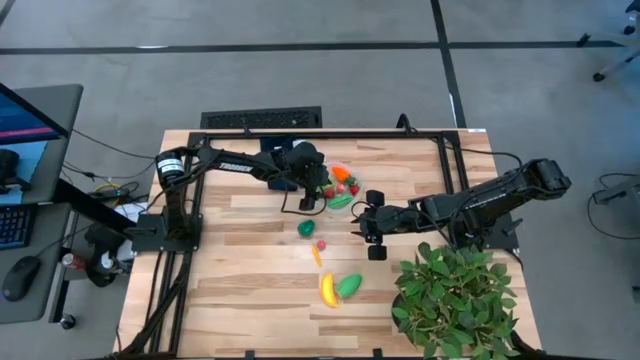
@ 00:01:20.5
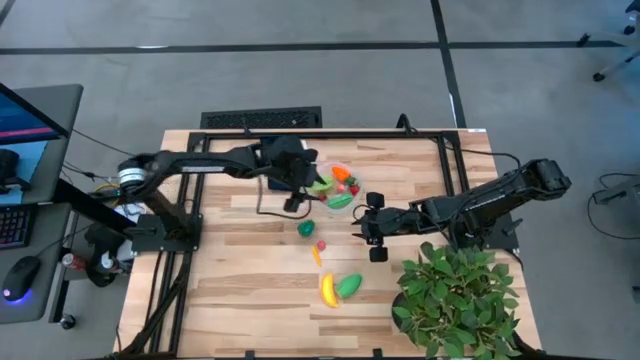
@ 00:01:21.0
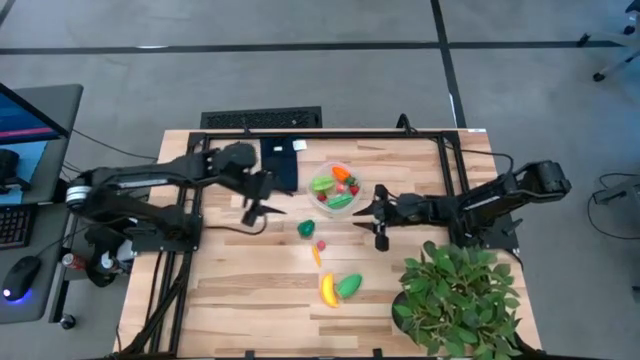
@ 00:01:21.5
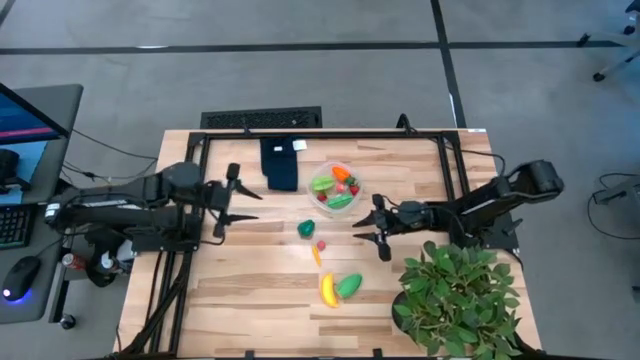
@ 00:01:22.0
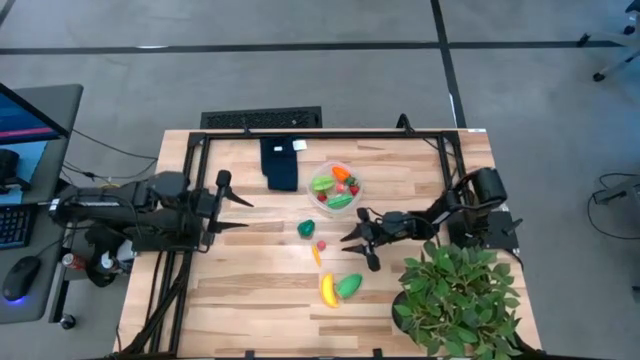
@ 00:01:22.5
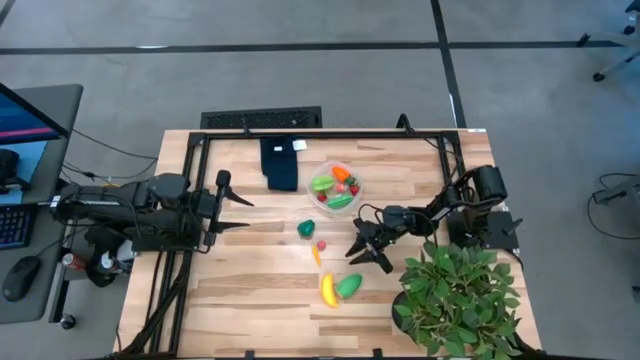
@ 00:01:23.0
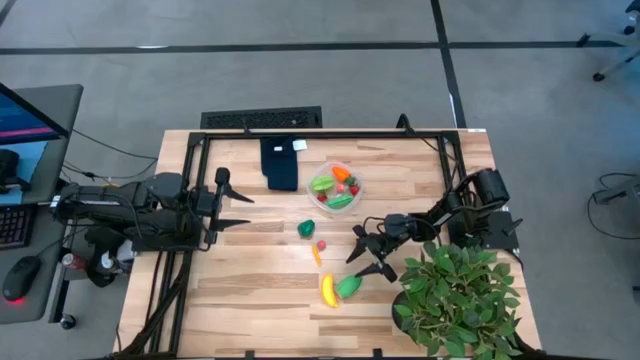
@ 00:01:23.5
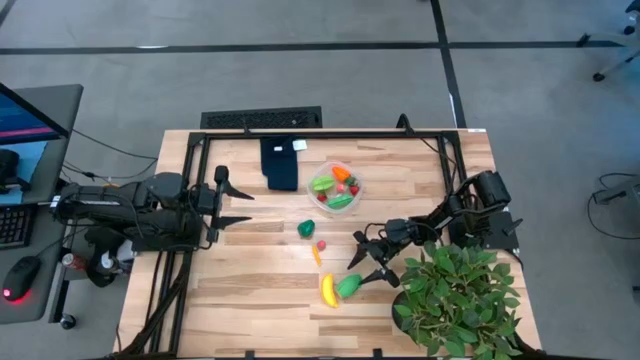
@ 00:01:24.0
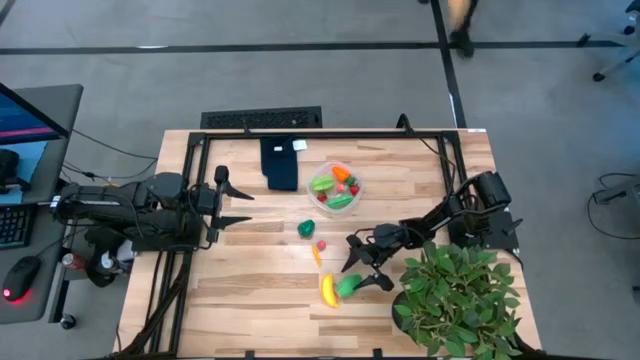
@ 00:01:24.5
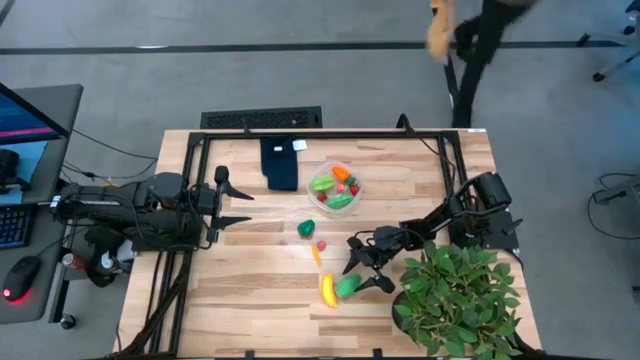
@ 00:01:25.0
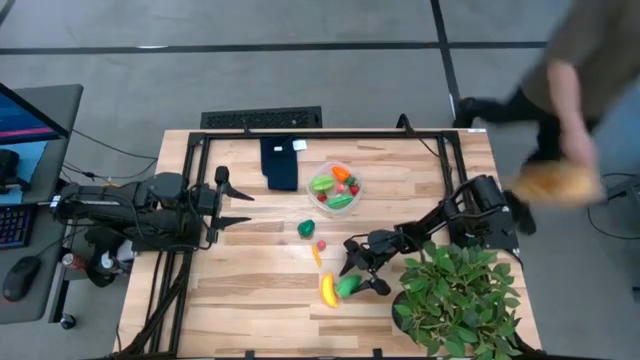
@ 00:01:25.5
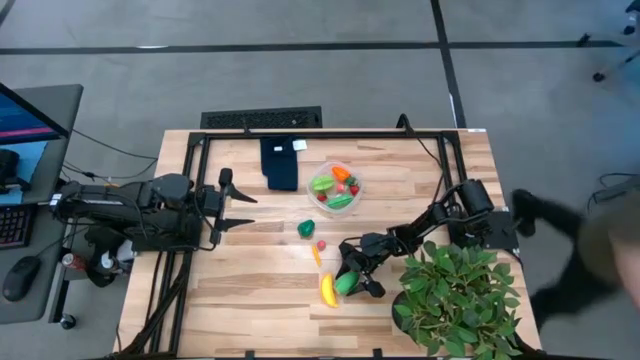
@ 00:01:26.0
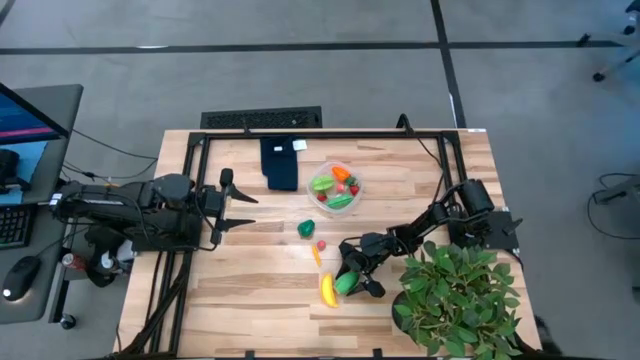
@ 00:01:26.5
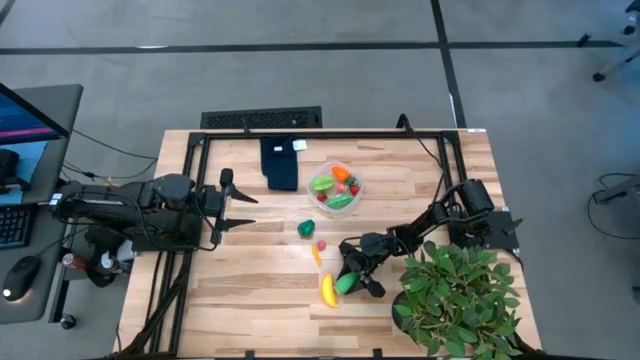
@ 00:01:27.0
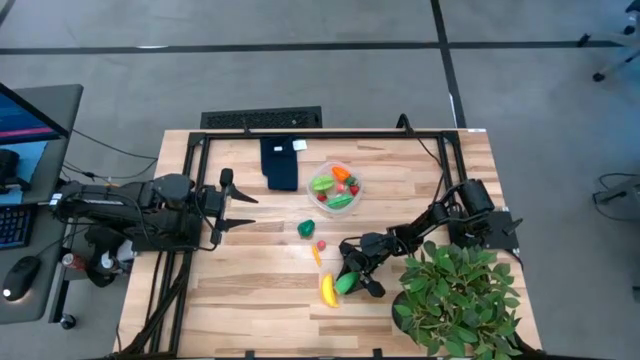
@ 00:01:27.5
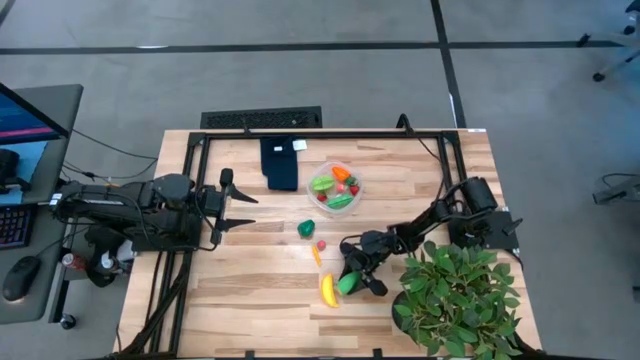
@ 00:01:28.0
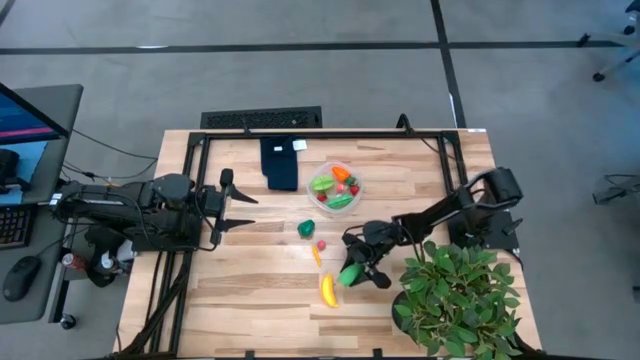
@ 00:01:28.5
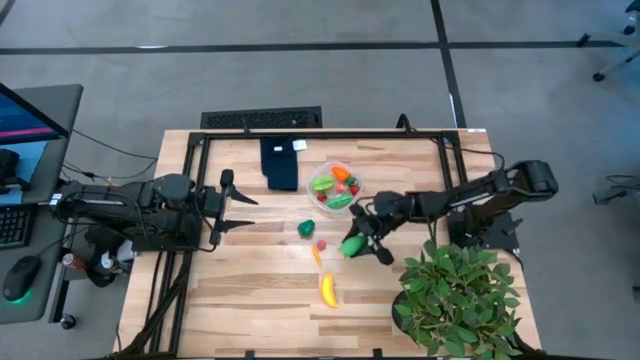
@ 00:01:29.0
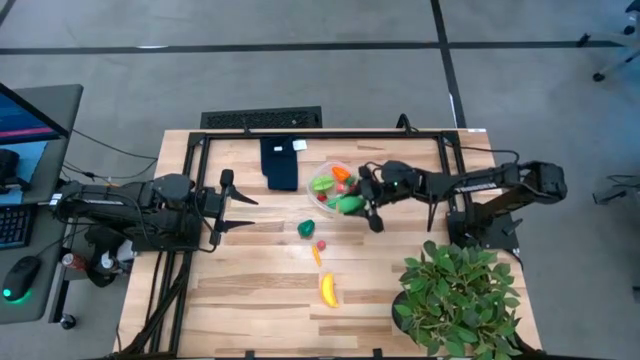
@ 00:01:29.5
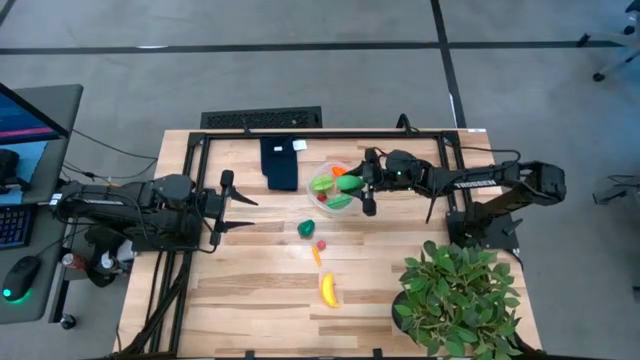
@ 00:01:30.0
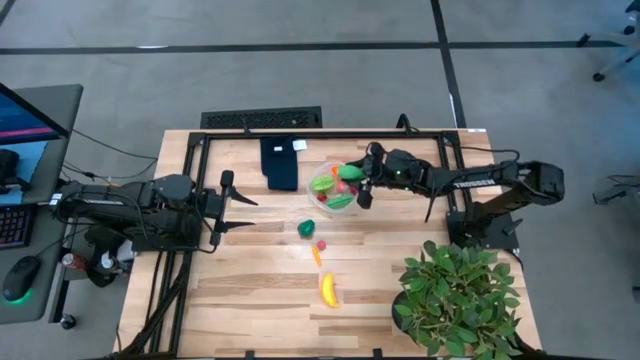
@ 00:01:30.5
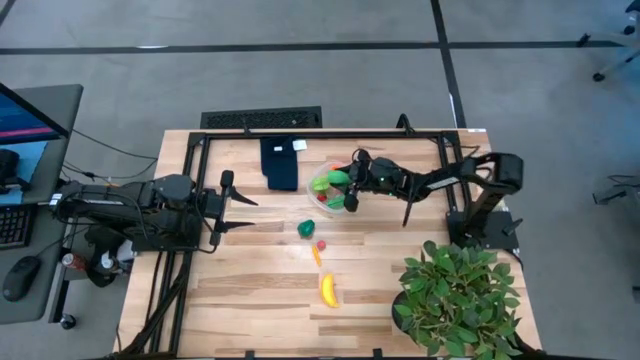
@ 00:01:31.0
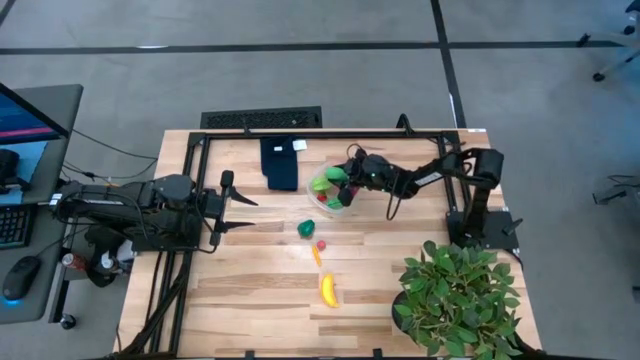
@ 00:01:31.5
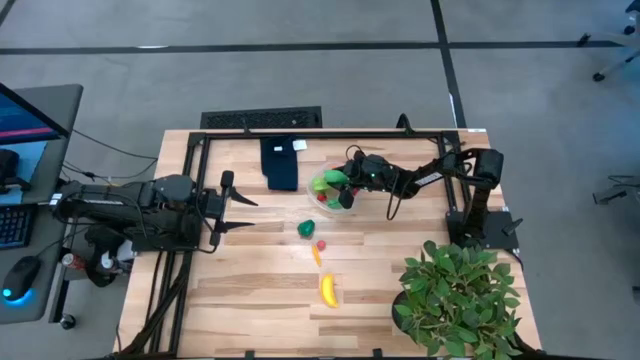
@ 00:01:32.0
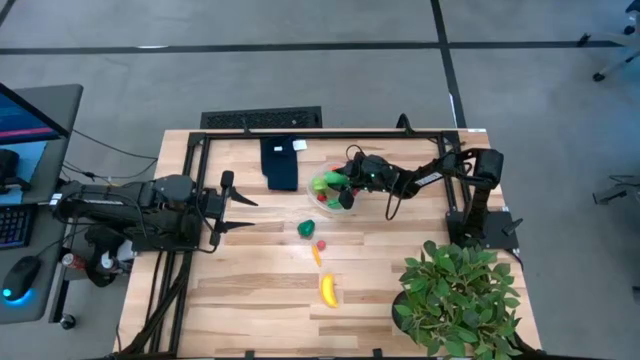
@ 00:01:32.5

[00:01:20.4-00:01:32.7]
Task: Pick and placing Produce into tupperware
Put the green corn into the transparent container

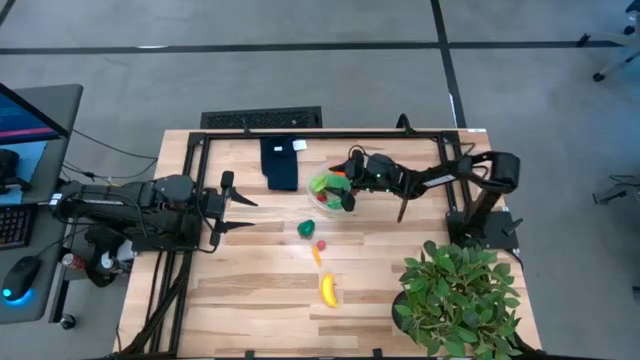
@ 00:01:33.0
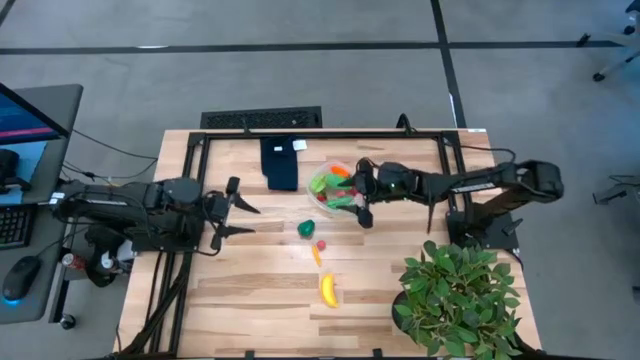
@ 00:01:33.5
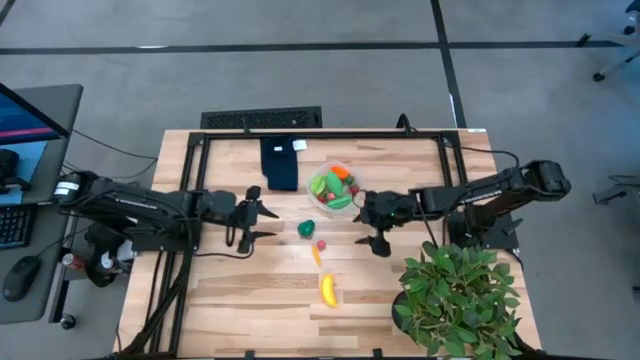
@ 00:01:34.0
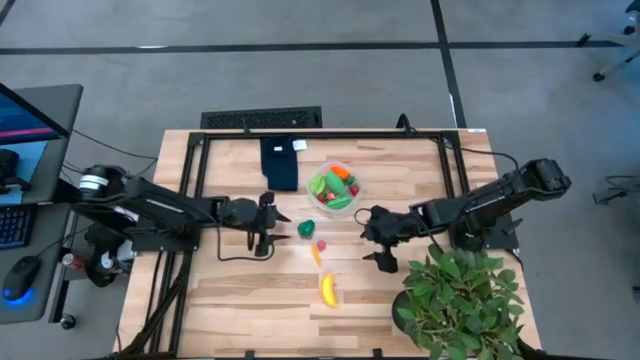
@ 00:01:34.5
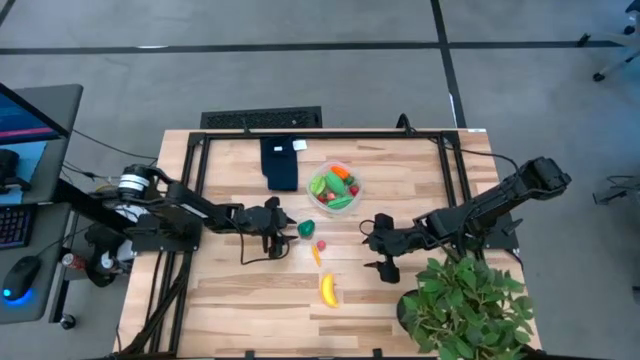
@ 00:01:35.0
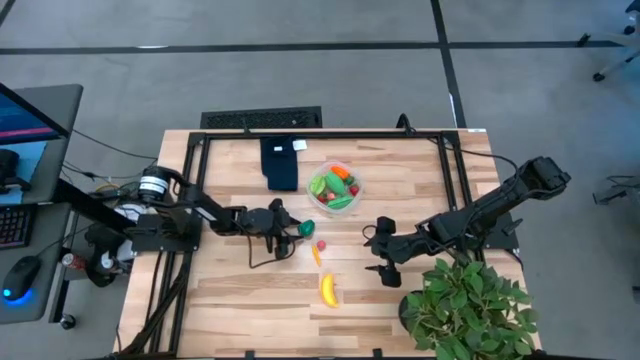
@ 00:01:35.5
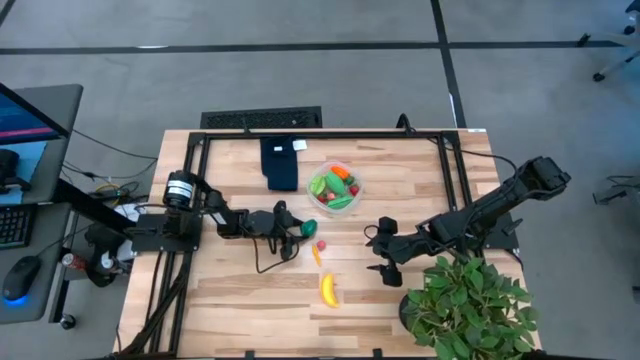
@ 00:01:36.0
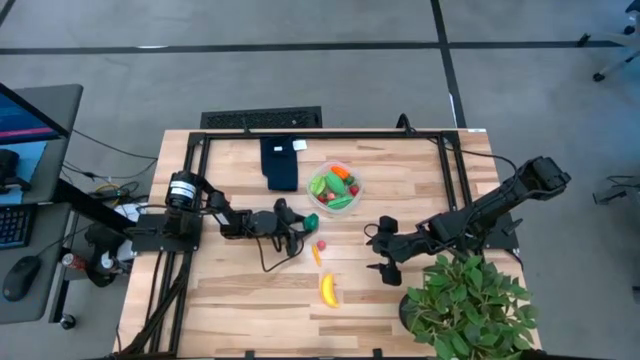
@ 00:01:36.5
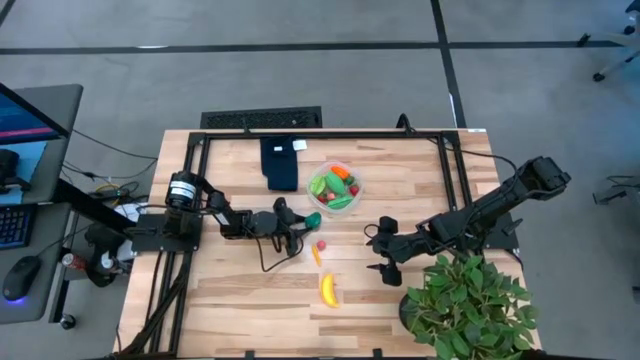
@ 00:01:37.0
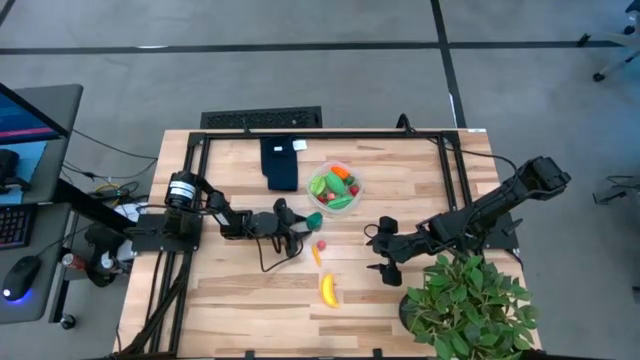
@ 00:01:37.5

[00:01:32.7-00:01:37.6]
Put the green bell pepper into the transparent container

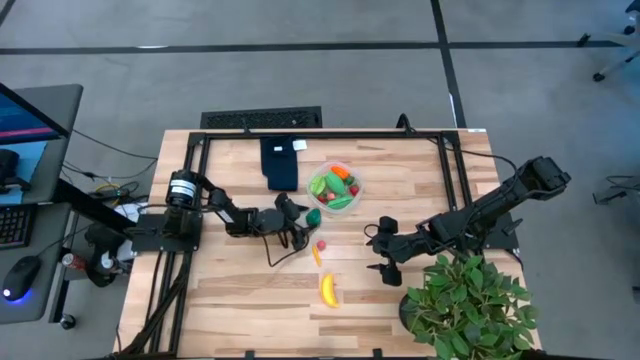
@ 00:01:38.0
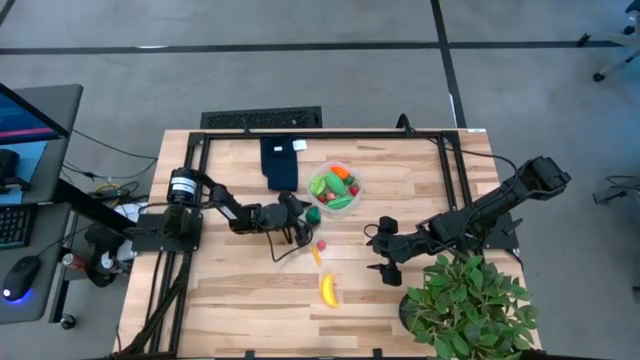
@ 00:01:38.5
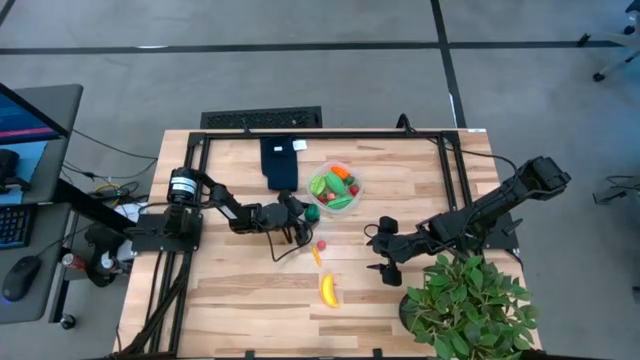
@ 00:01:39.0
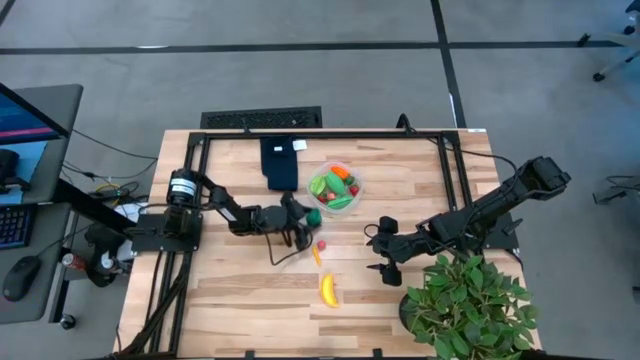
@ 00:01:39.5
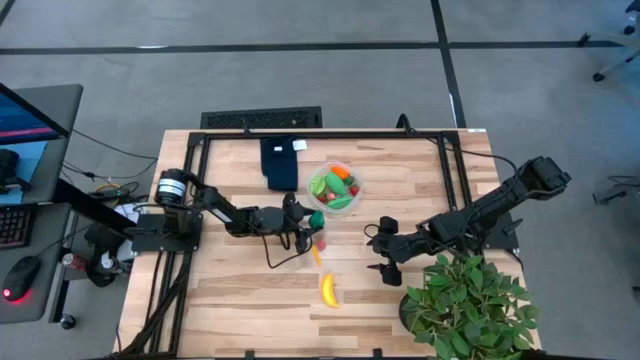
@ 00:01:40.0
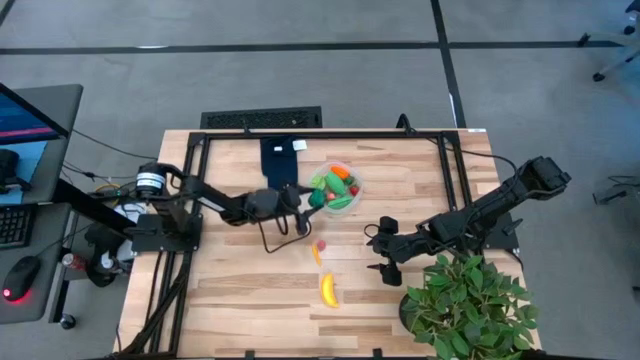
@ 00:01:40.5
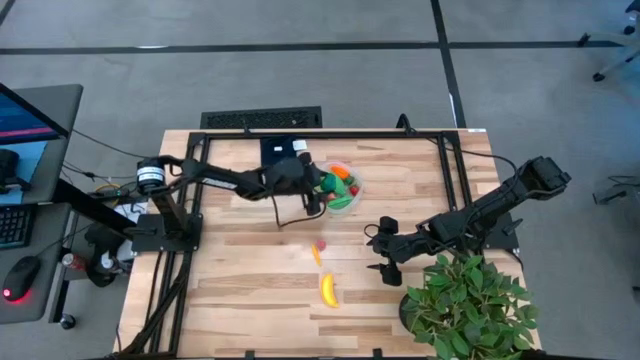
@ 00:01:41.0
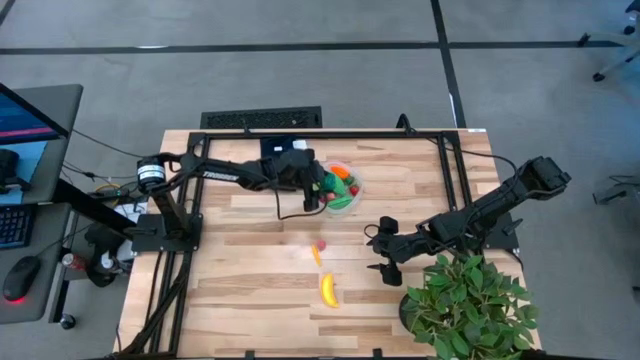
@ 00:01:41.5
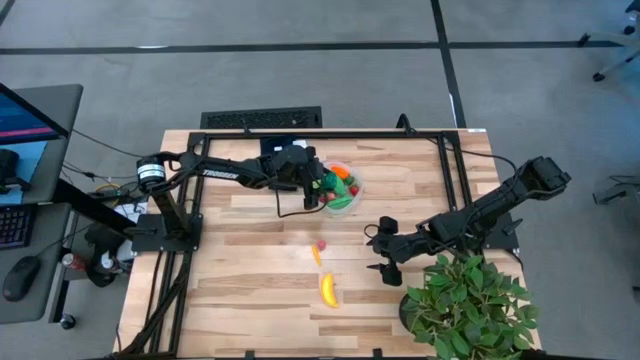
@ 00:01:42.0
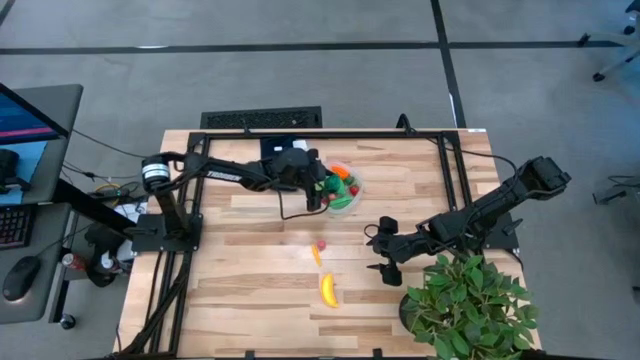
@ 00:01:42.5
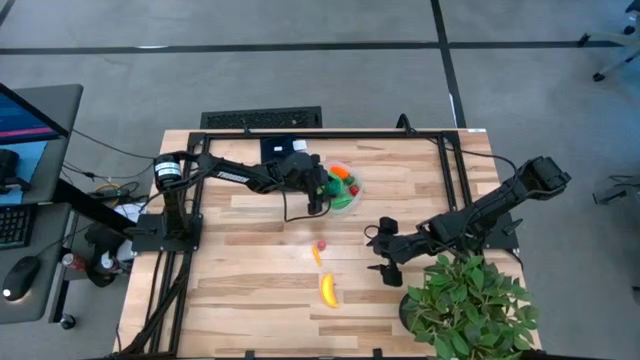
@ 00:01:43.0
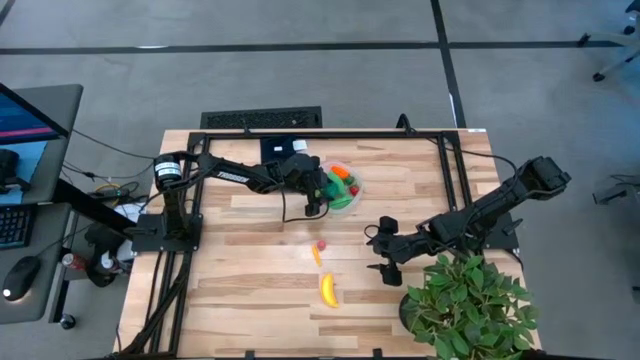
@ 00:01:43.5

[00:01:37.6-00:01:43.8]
Put the green bell pepper into the transparent container
